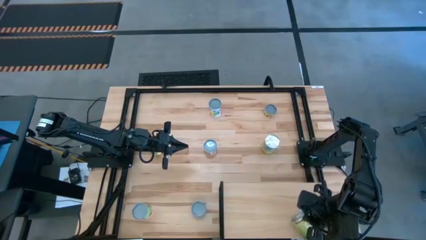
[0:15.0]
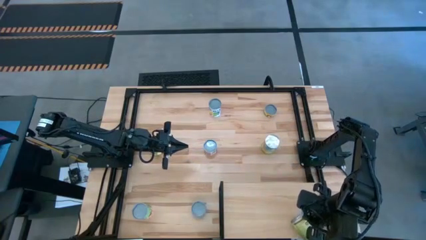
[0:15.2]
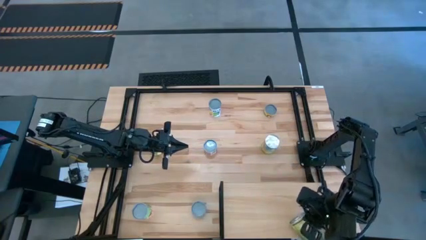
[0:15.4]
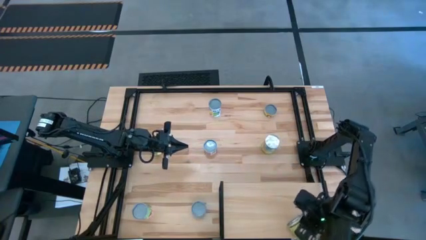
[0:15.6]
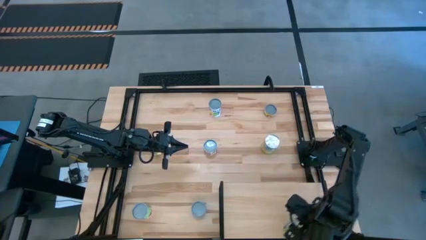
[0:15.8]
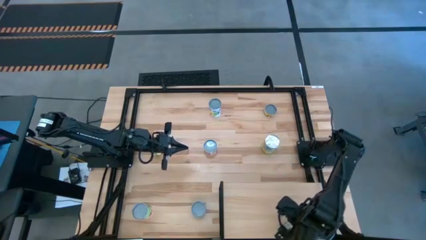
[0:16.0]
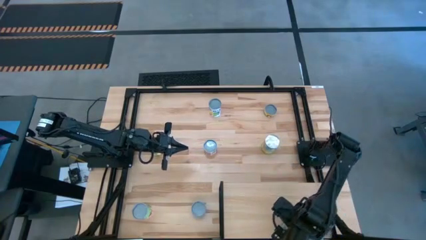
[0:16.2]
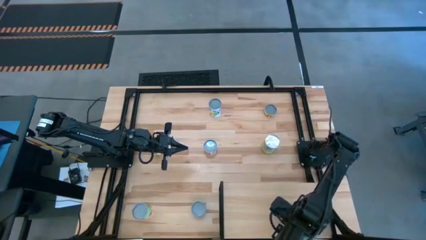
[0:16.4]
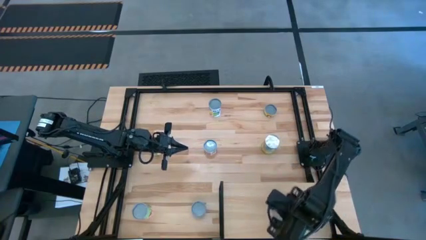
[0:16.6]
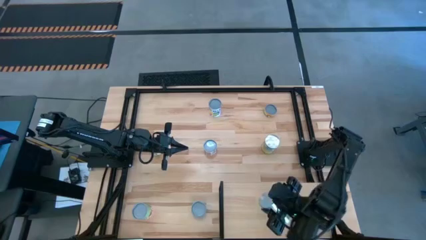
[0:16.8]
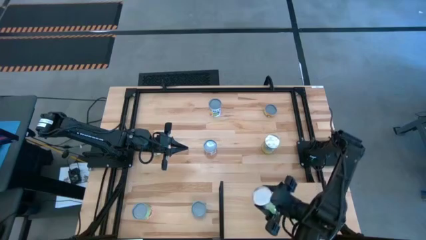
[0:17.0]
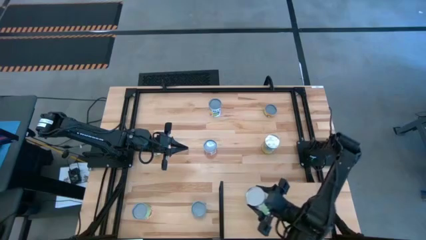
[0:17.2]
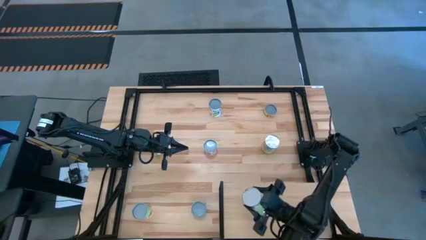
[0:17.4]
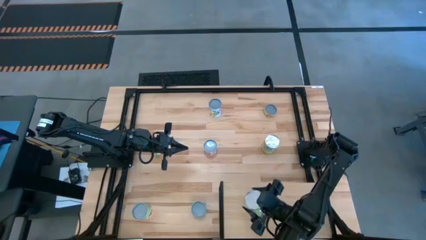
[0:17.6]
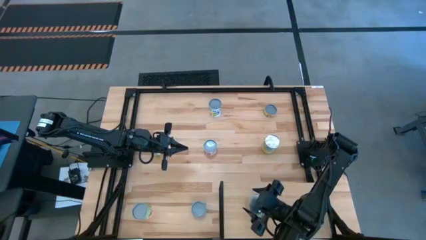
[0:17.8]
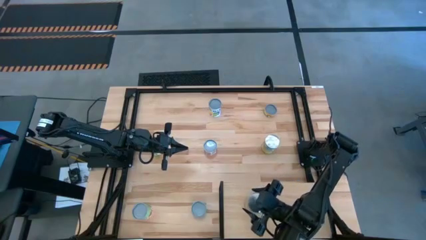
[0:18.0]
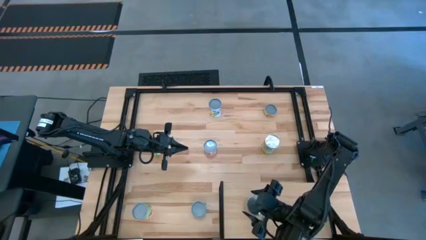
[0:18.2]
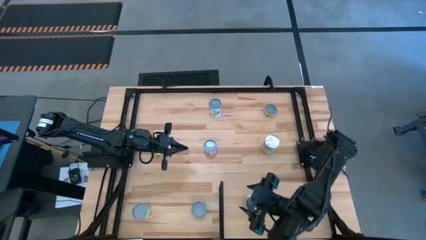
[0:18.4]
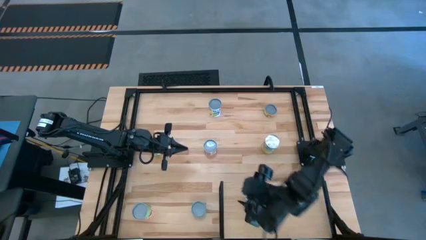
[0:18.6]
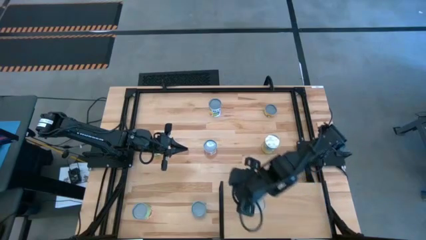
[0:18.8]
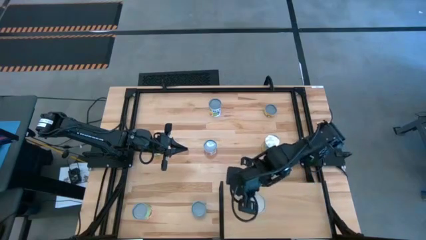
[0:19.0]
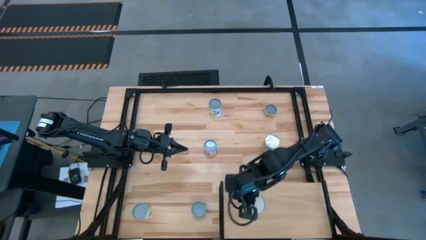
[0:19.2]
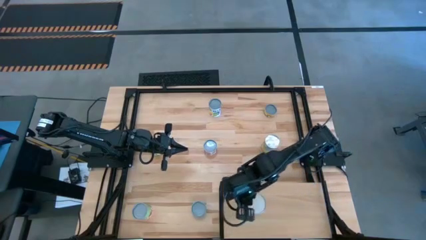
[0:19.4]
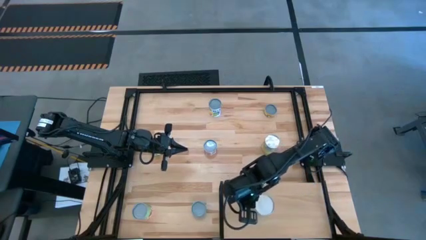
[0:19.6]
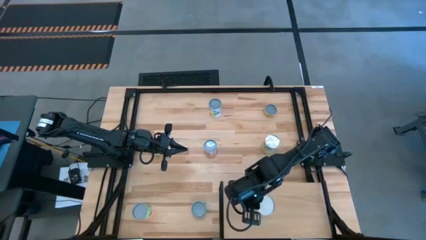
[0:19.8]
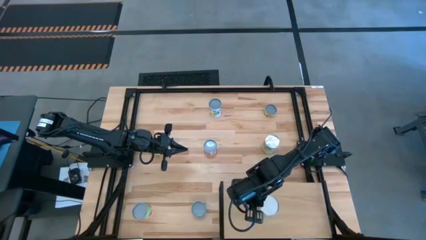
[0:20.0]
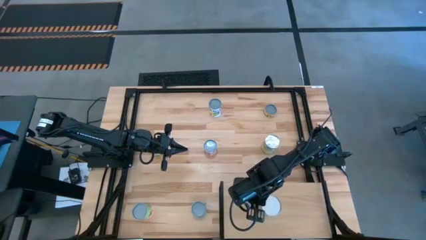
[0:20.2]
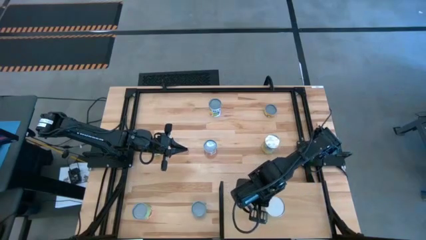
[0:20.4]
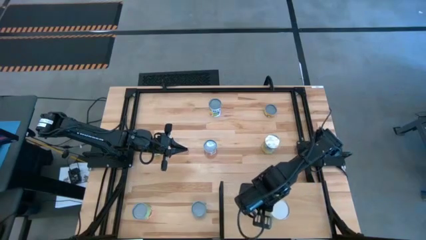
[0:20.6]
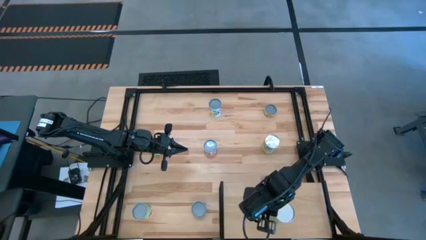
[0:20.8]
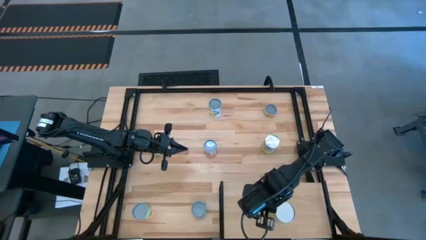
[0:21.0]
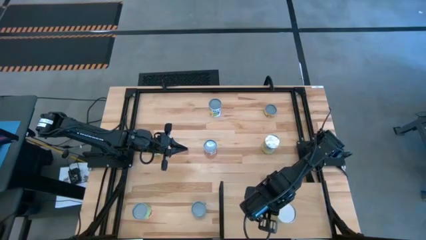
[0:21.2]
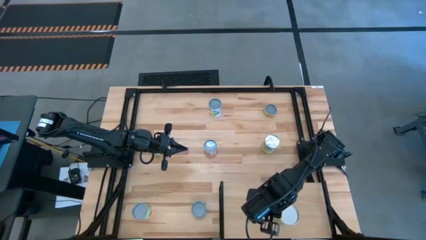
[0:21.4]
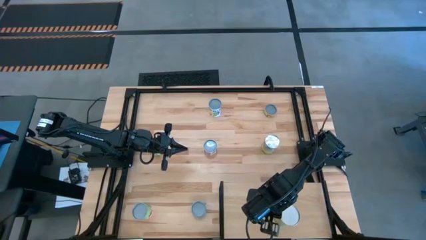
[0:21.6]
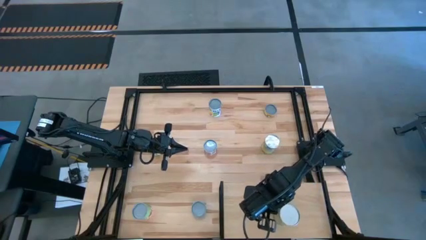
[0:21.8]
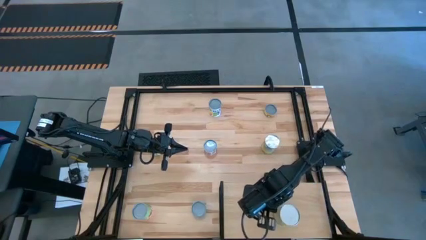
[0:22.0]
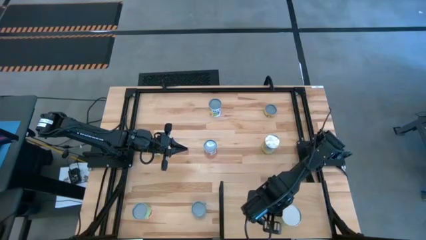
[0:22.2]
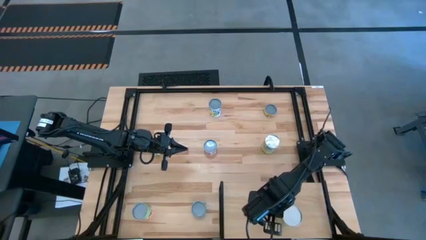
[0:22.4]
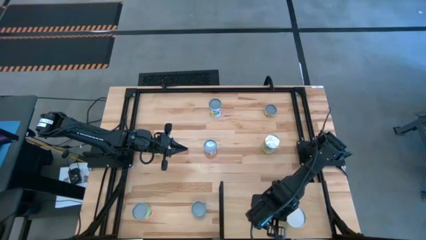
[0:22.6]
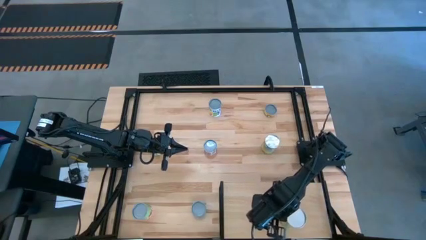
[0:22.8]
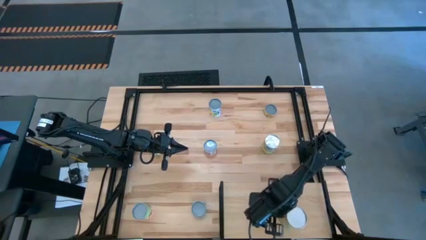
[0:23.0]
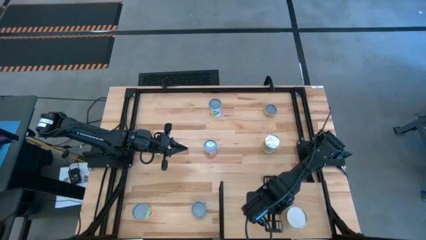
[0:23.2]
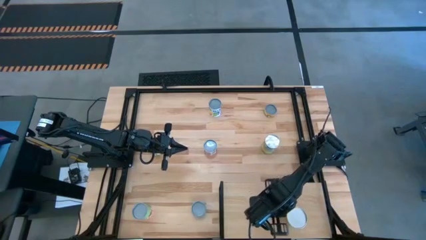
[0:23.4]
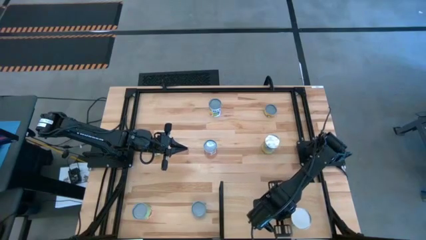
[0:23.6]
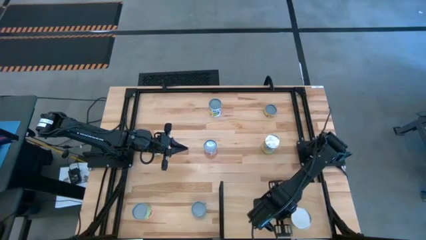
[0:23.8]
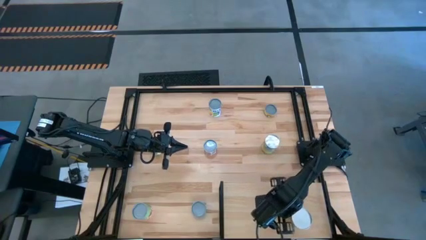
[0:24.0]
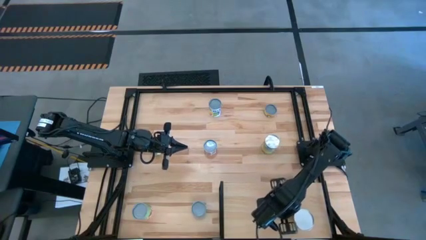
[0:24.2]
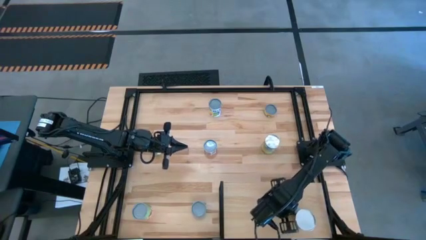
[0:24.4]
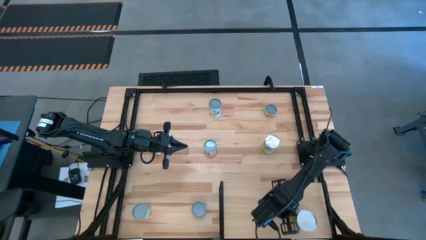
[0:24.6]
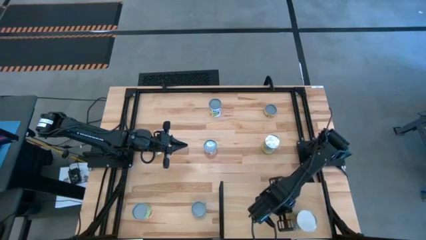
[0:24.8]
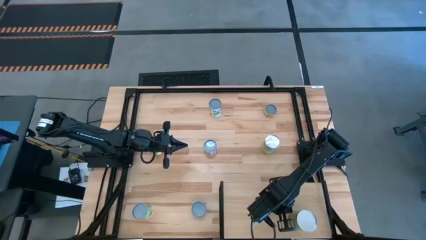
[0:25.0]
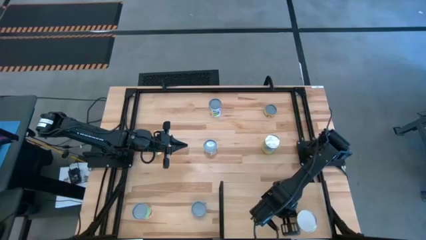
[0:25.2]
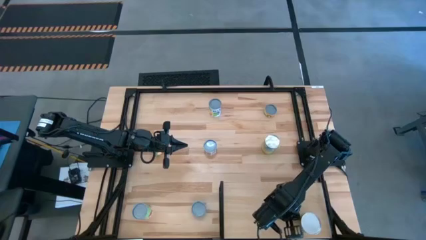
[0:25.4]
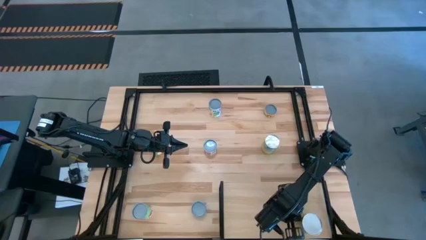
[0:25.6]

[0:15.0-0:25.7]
Task: Pick and place cans onto a shelf
Put the canned oranges on the shelf

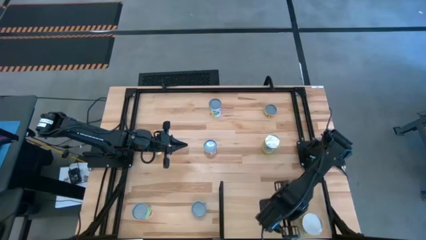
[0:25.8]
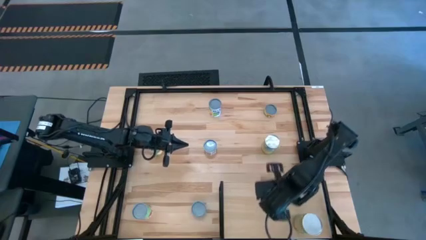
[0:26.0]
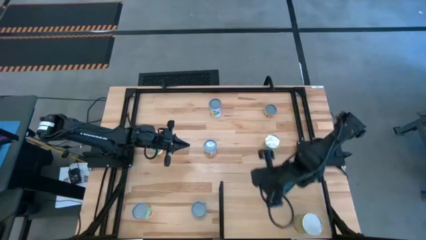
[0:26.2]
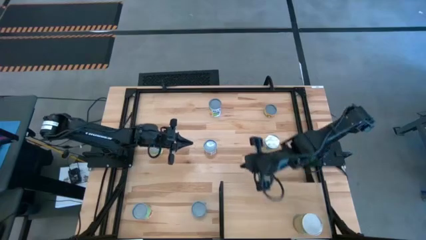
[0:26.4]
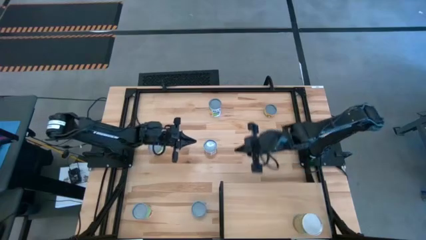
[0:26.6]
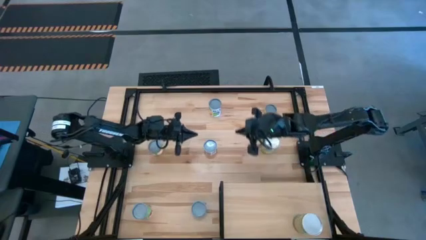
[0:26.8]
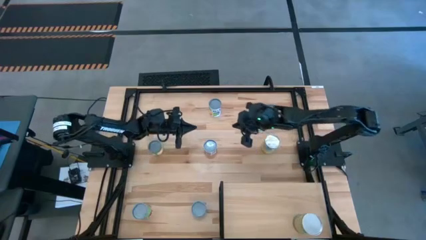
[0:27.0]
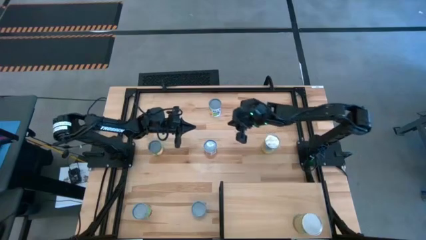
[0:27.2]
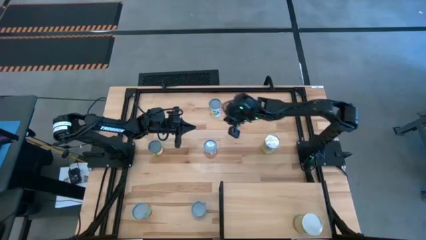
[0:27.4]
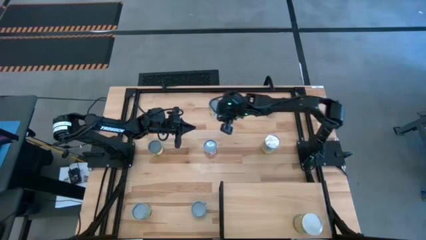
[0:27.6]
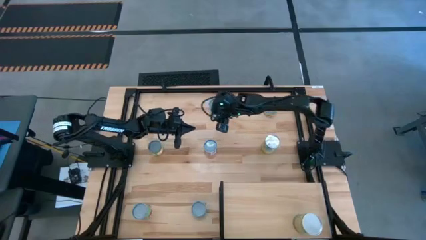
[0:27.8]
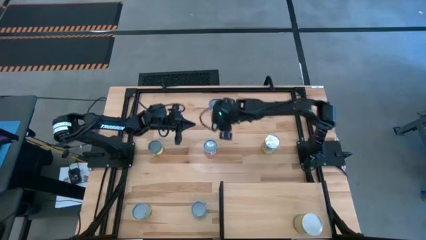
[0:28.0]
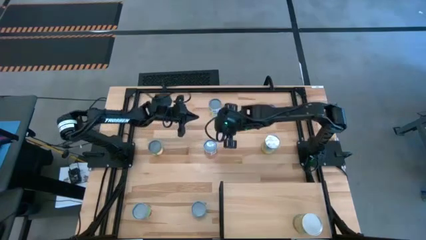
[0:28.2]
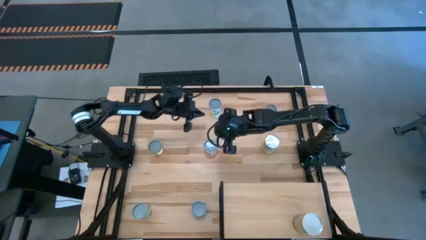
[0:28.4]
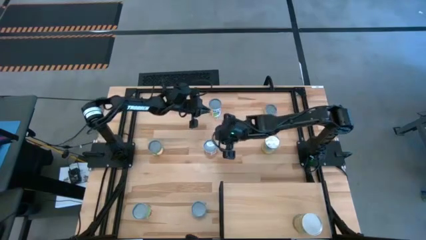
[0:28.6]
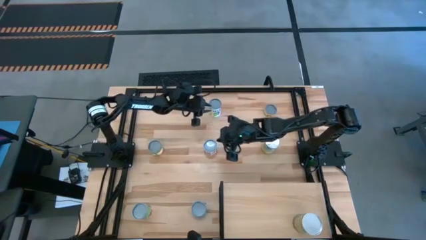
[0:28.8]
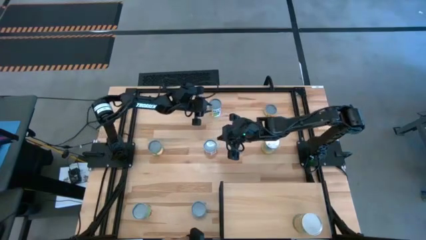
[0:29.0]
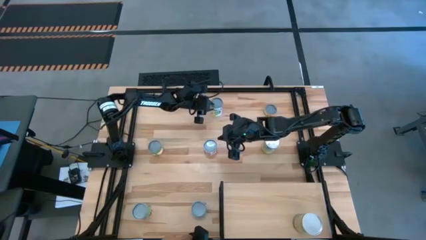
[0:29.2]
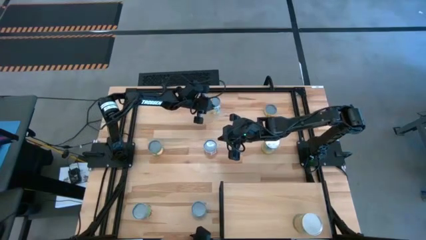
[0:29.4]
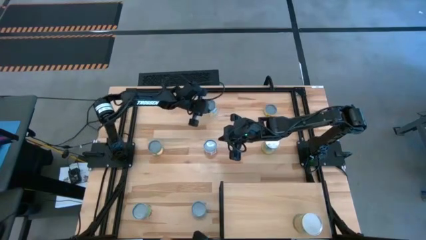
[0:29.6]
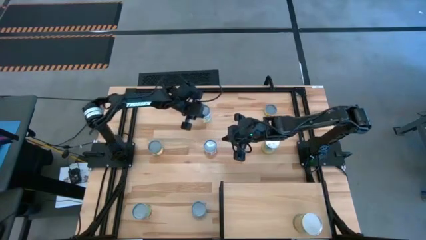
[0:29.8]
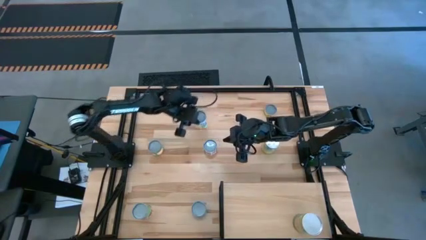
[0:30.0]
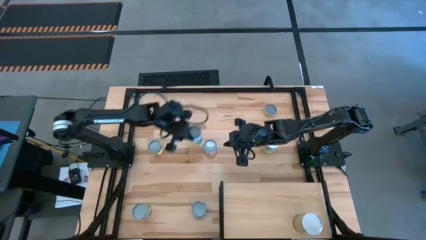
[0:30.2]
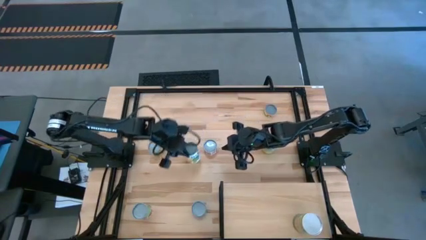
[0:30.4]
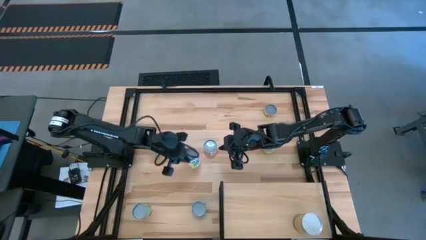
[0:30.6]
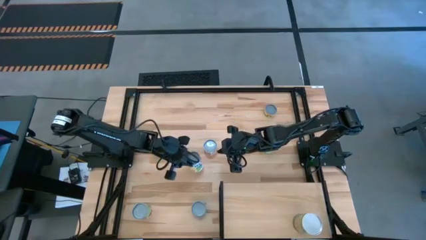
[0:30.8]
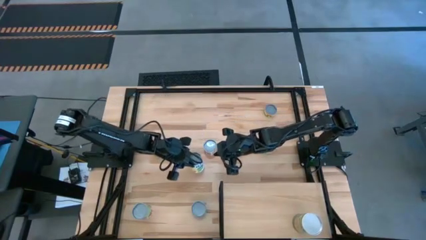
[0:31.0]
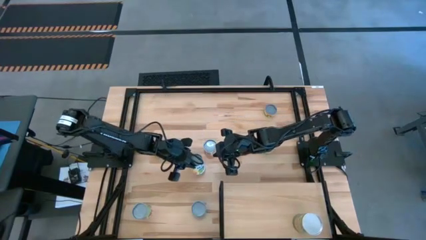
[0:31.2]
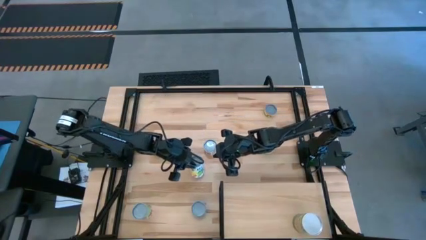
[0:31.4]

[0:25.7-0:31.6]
Move the canned mixed fruit to the center of the table
